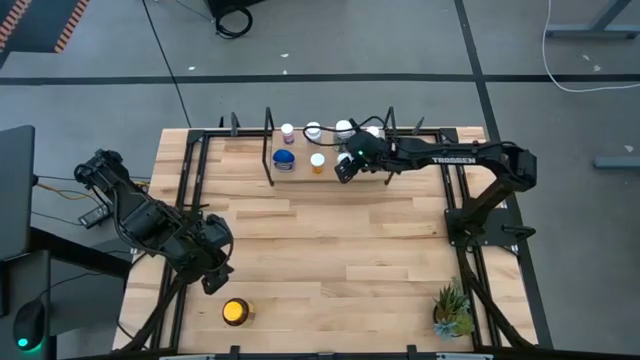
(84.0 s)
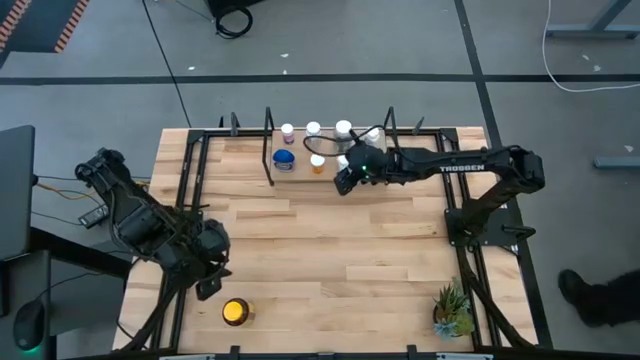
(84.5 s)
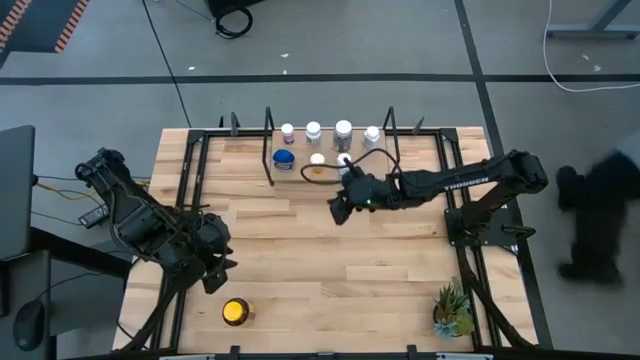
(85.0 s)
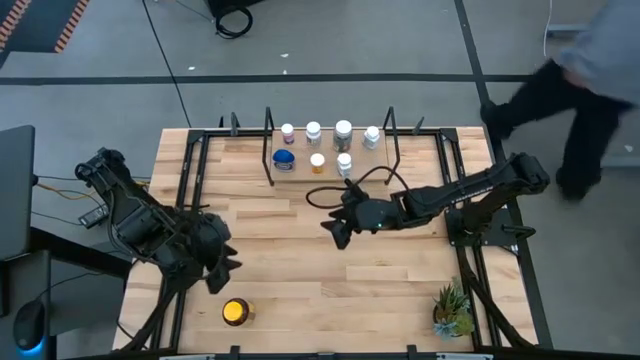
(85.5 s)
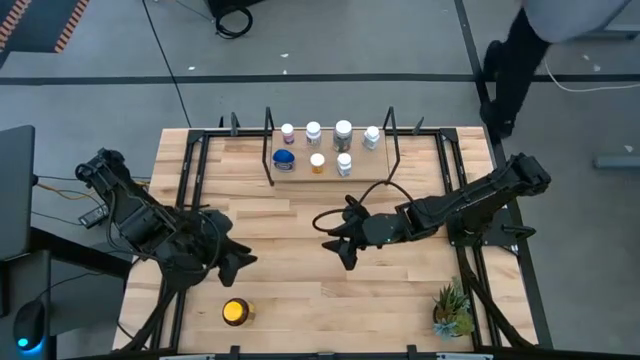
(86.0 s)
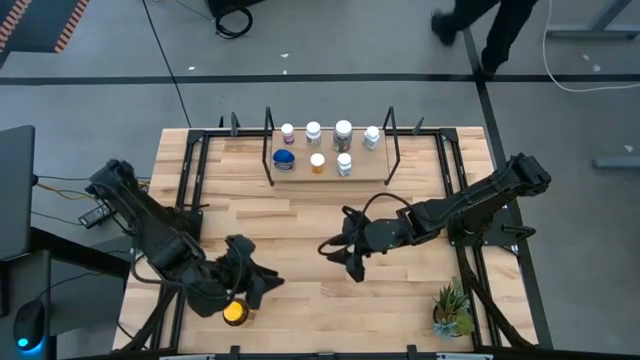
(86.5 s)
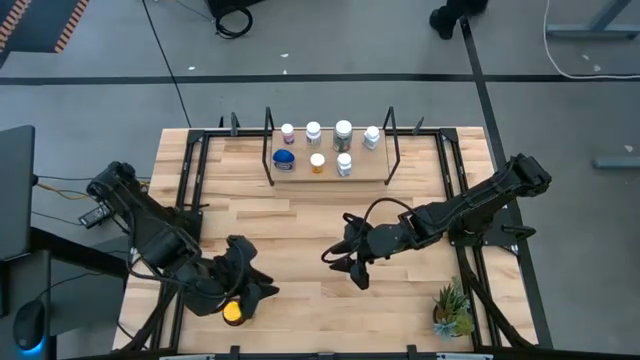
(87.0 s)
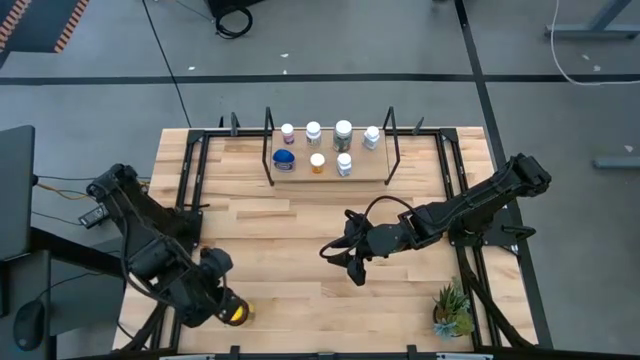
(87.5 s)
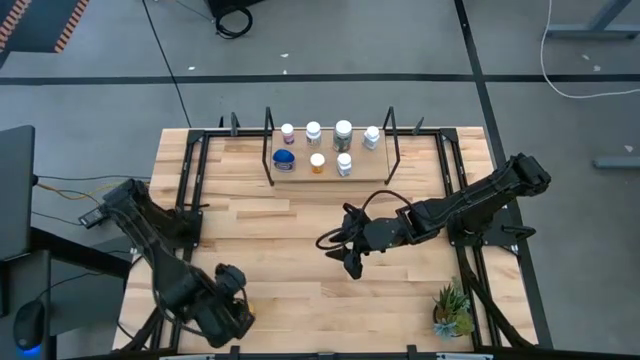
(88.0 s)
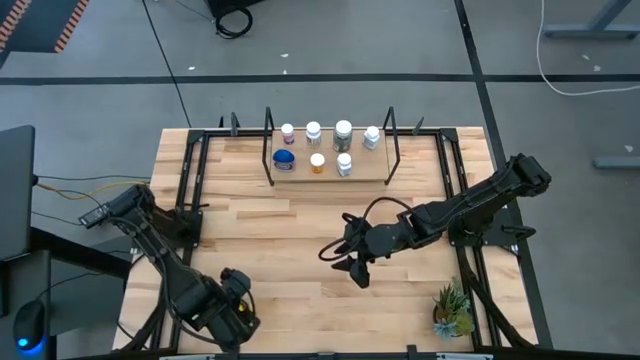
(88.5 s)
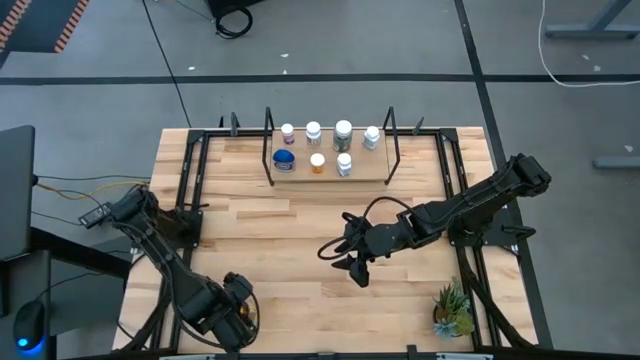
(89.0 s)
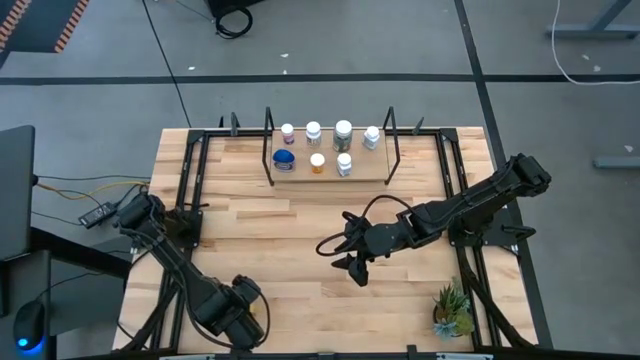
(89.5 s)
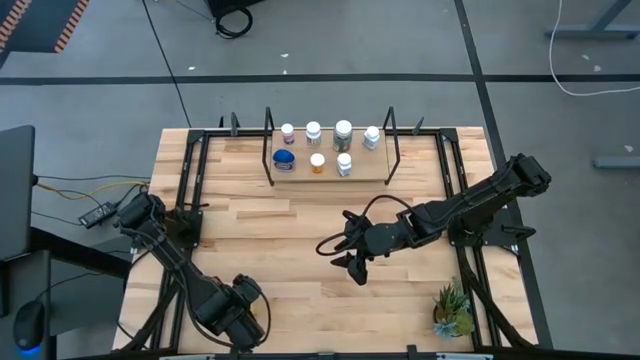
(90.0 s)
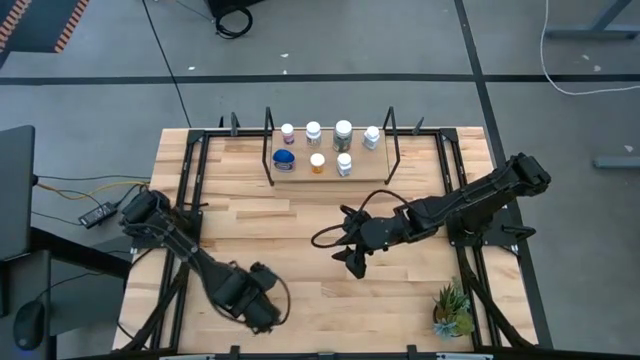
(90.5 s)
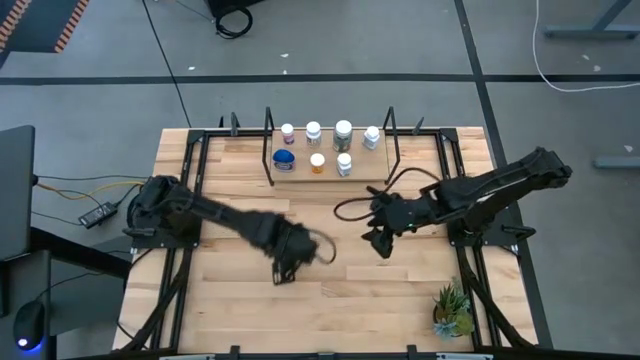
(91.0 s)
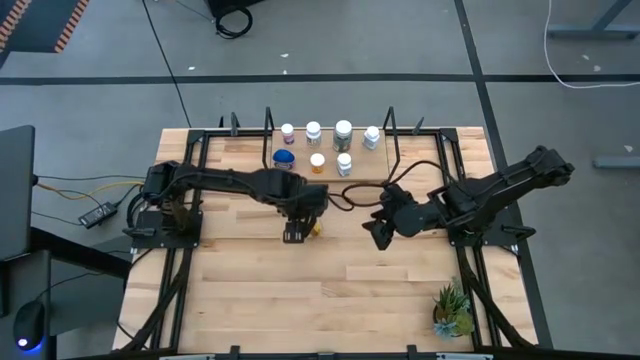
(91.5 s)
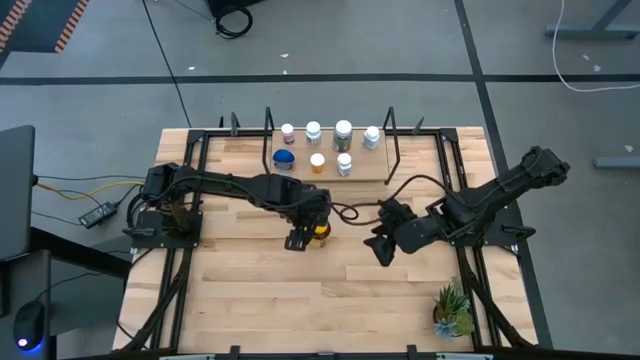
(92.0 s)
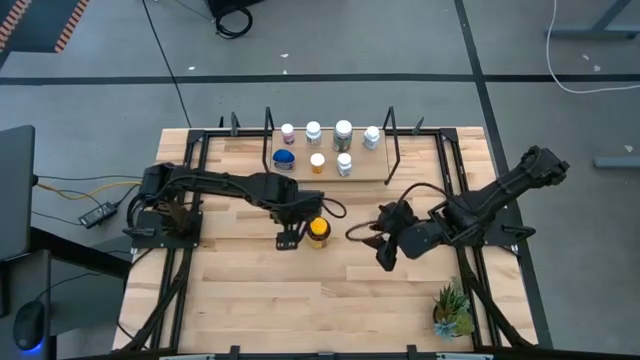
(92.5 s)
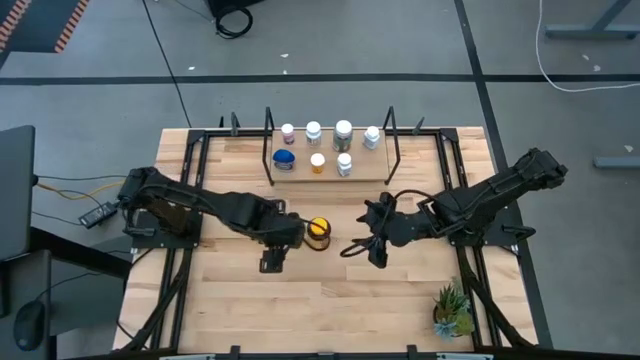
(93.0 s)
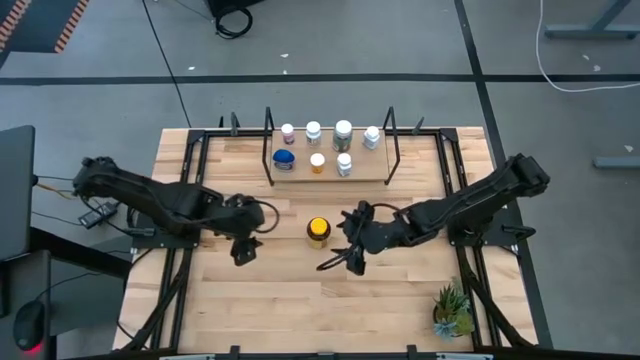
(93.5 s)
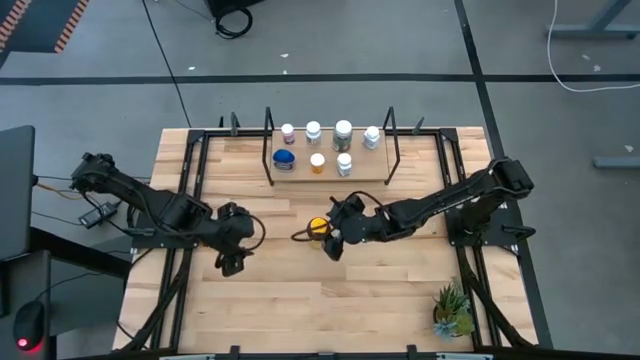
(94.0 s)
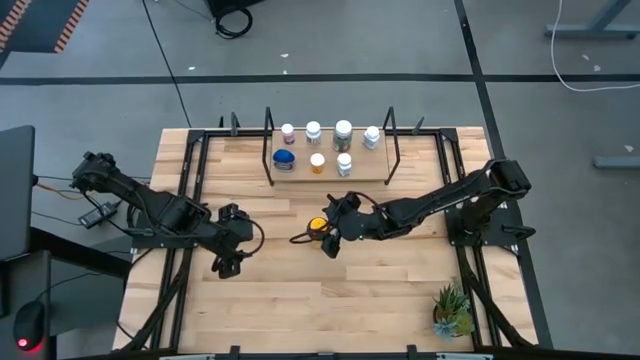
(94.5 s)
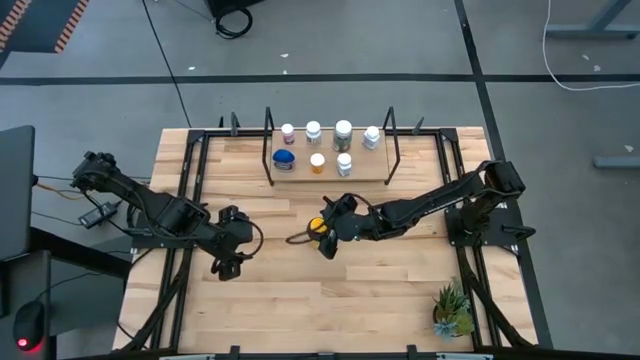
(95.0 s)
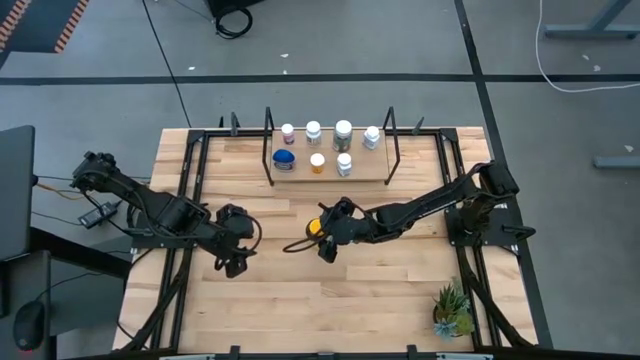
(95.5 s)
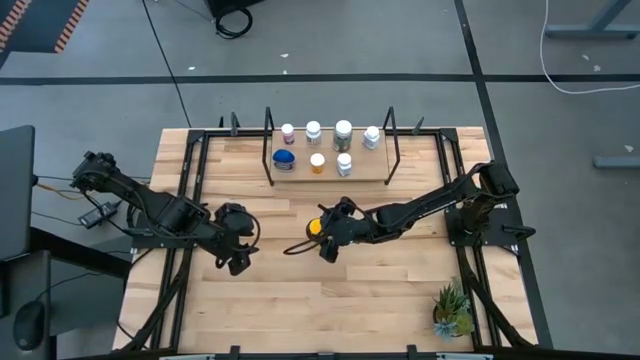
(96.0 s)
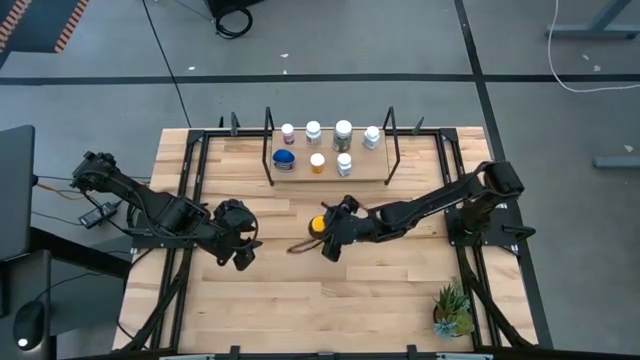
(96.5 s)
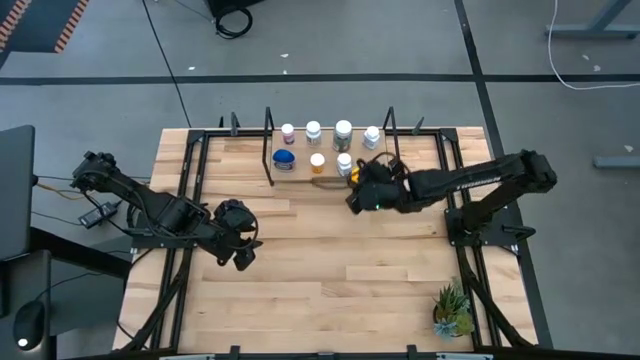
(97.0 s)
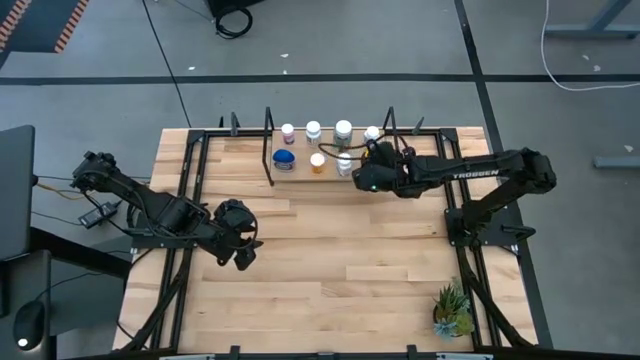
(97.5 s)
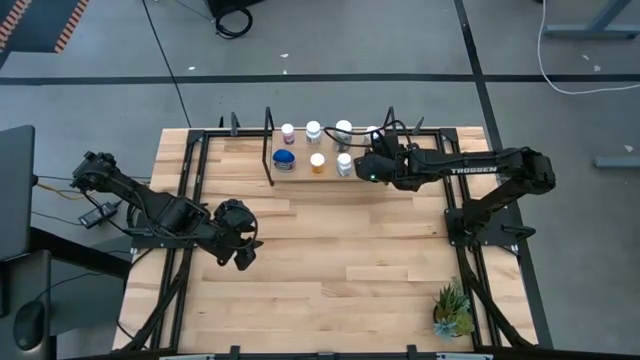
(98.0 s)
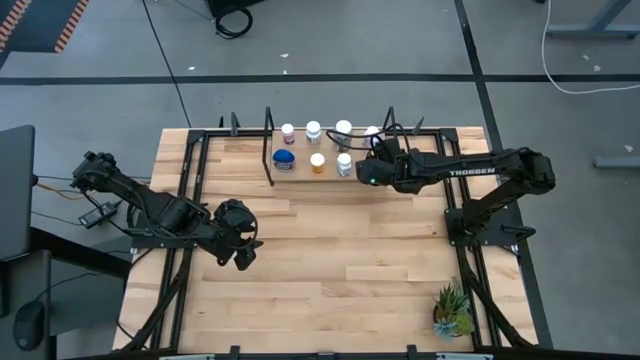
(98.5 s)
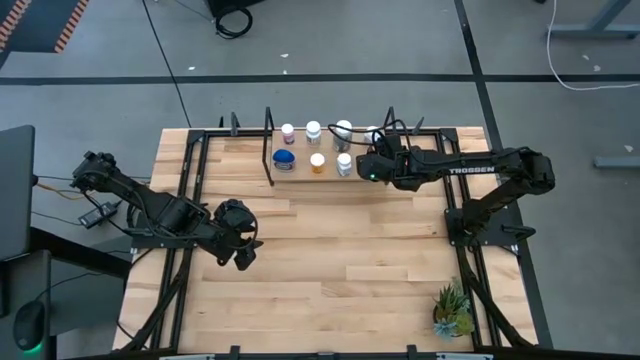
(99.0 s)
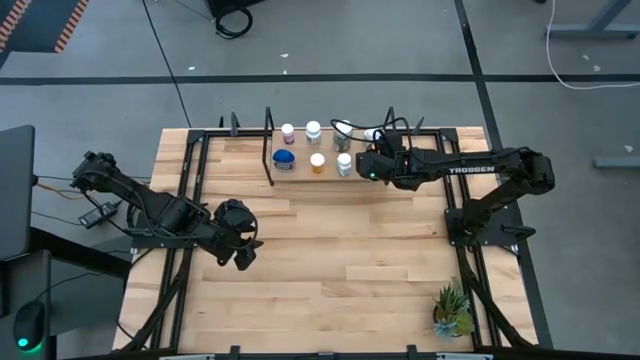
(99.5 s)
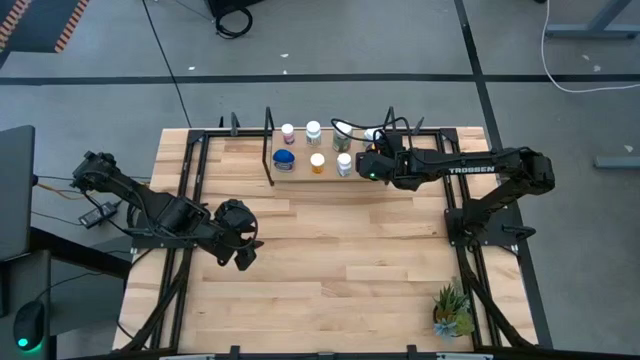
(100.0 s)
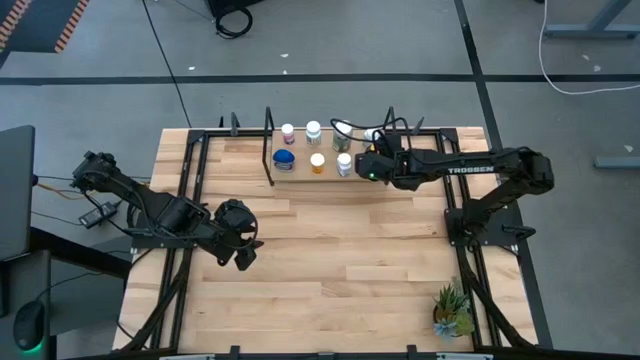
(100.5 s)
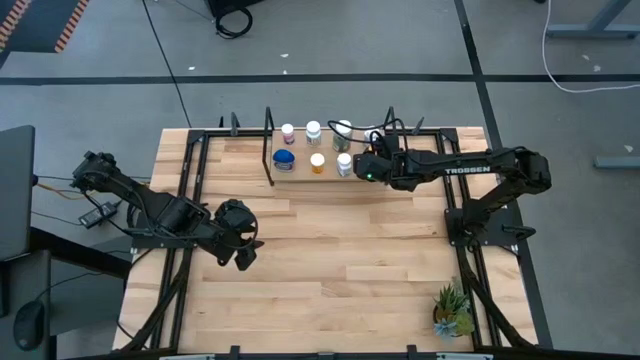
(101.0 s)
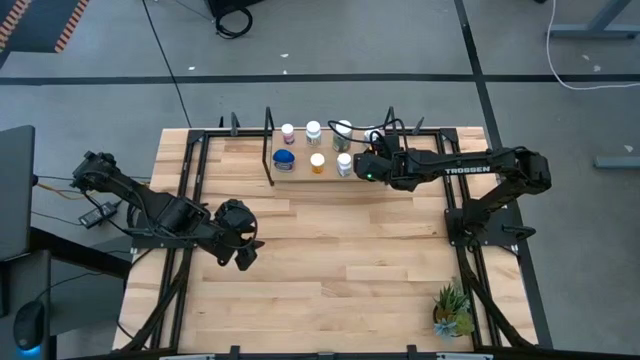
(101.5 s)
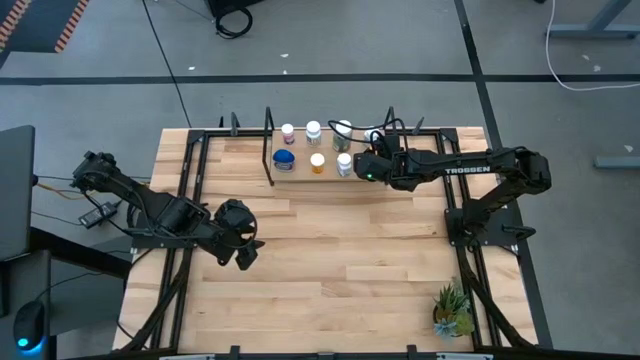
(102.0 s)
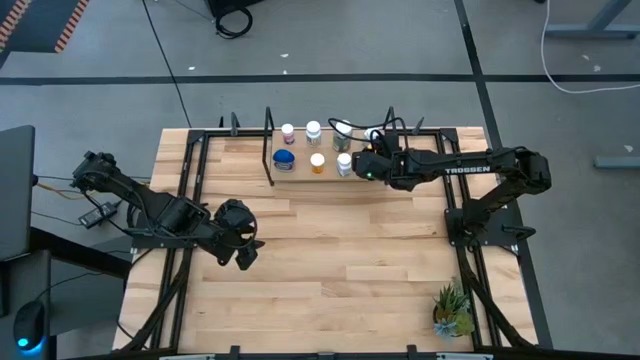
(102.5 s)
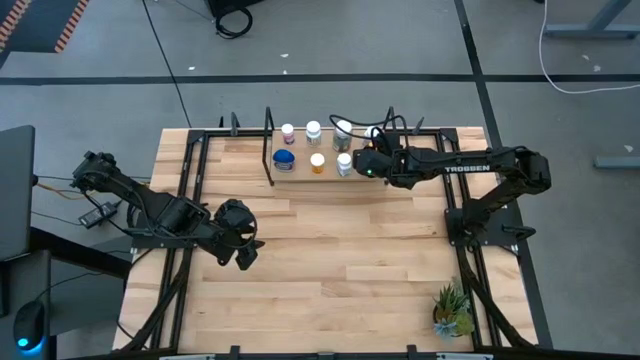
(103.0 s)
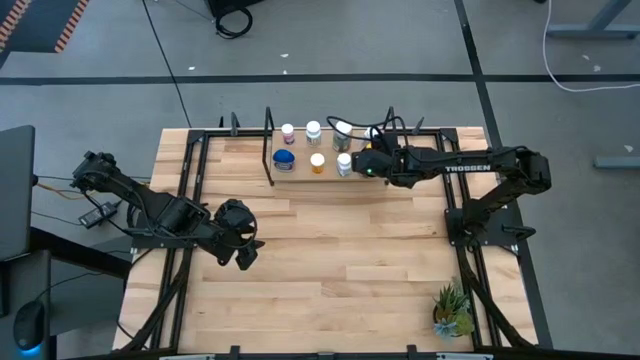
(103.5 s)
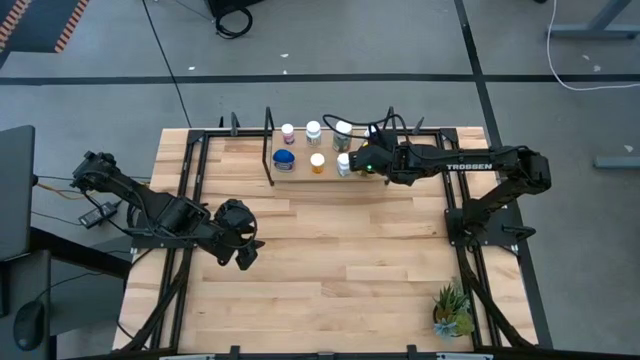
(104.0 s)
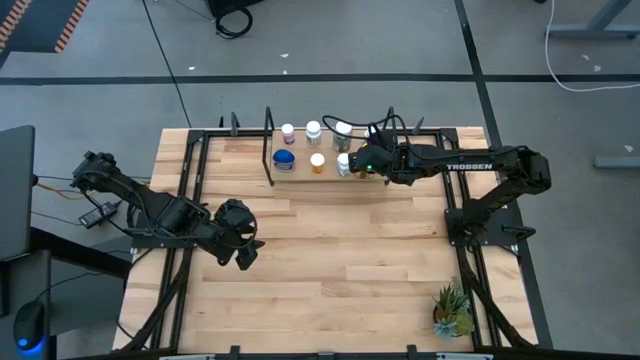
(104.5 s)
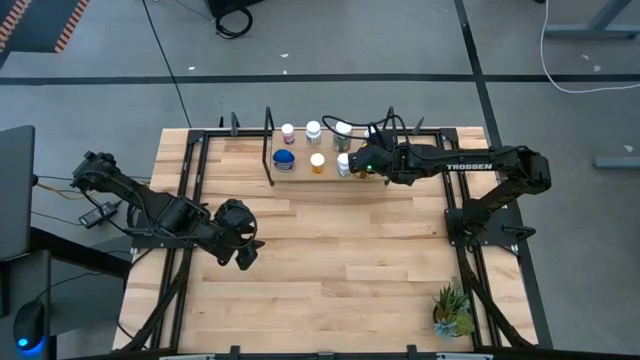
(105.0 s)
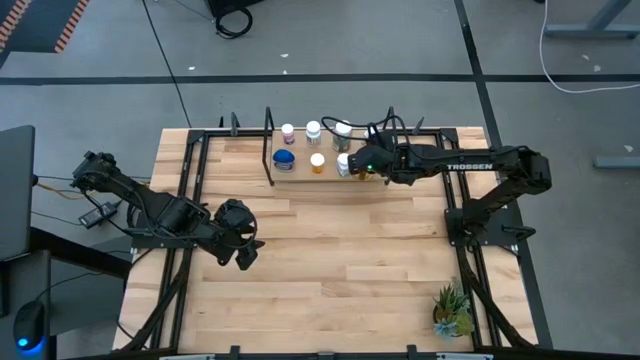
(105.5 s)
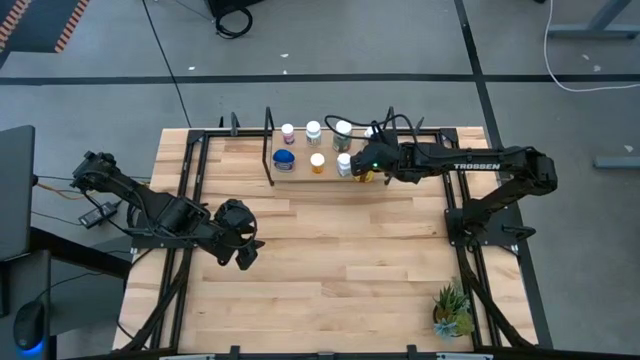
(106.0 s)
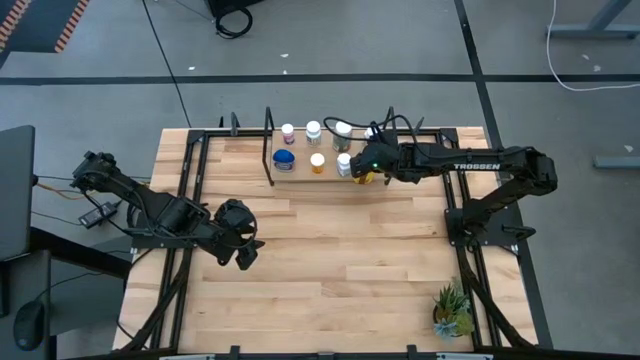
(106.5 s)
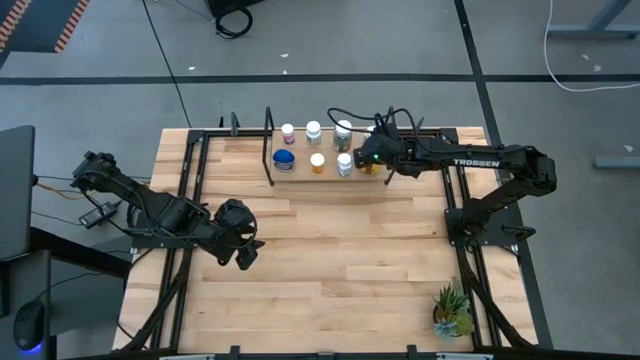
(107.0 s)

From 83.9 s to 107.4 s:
Task: Pick and place medicine bottles onto shelf by color
Put the yellow pill bottle on the shelf
